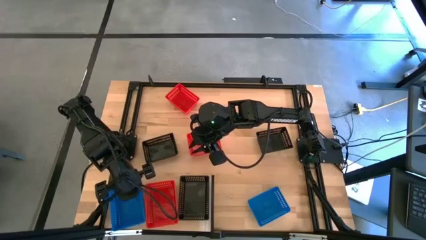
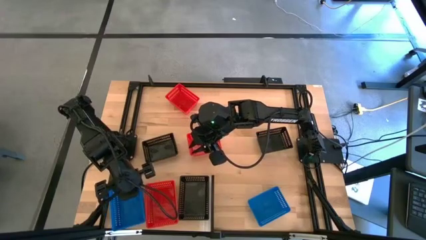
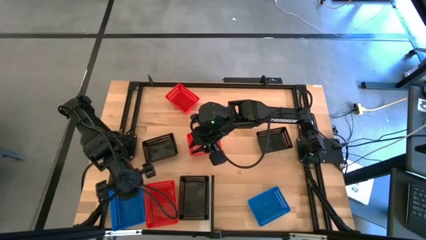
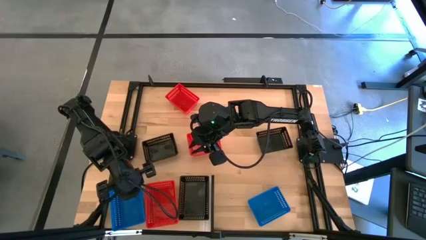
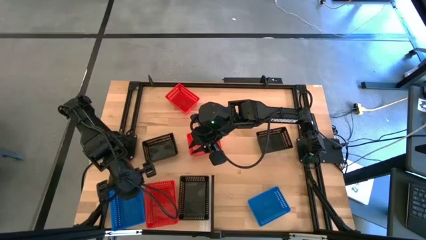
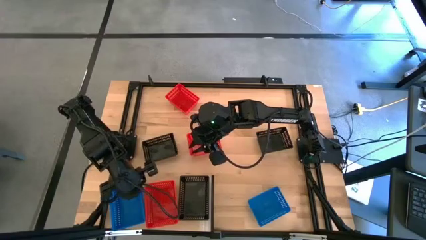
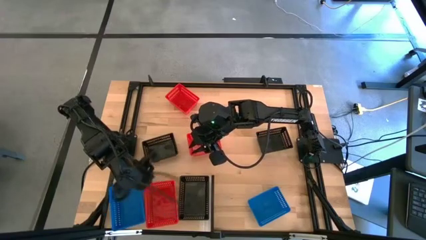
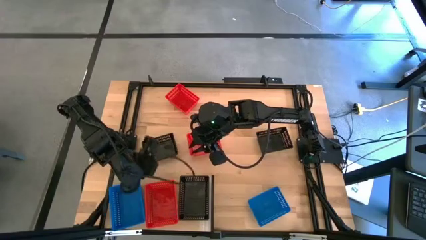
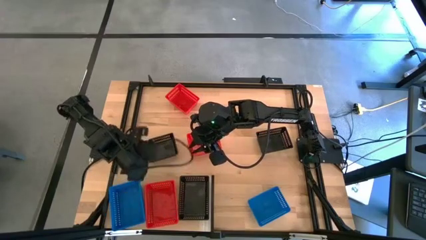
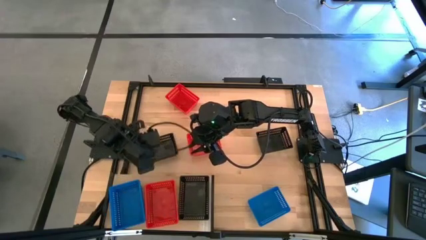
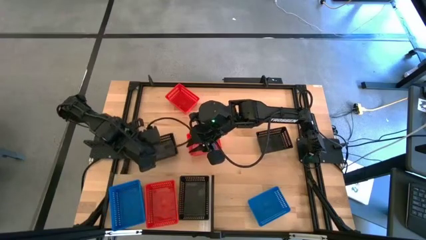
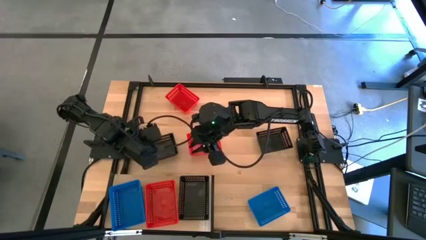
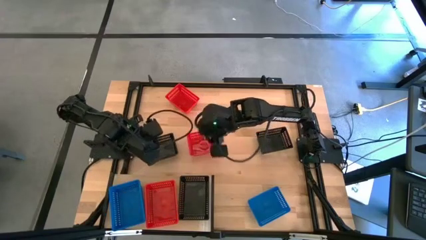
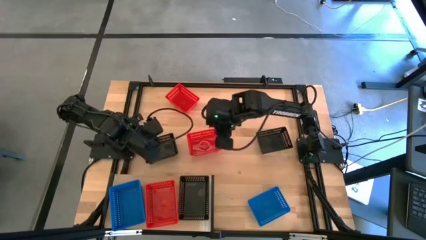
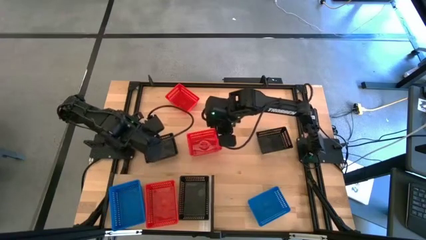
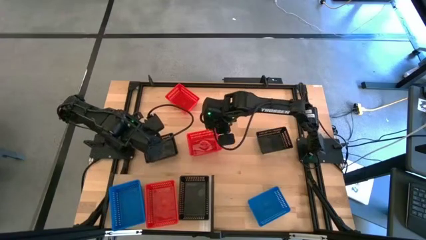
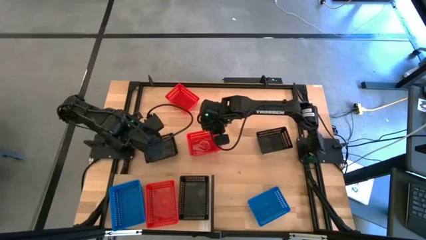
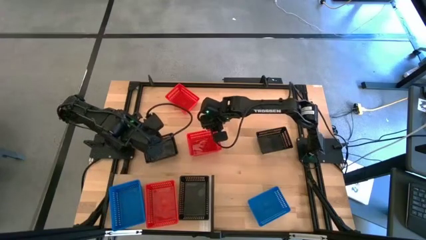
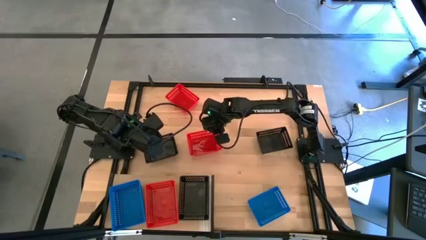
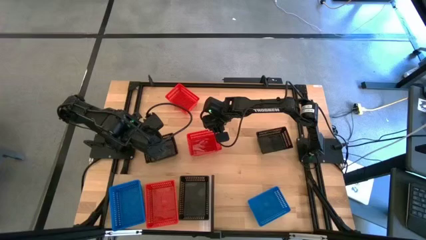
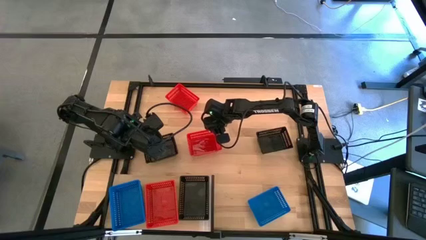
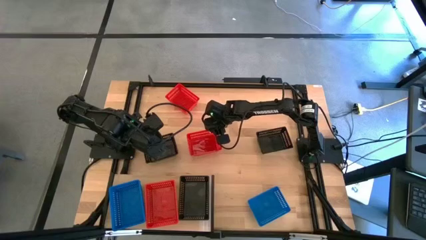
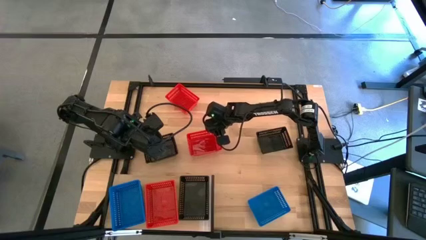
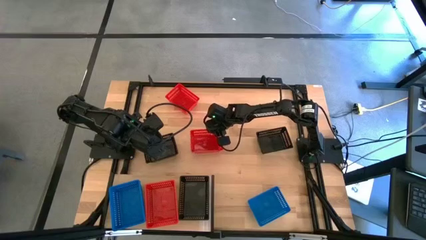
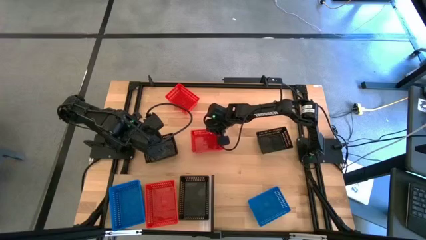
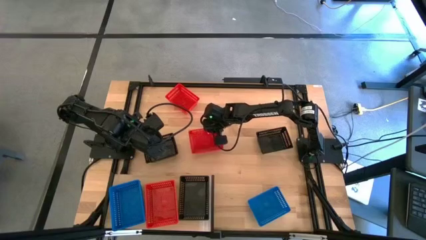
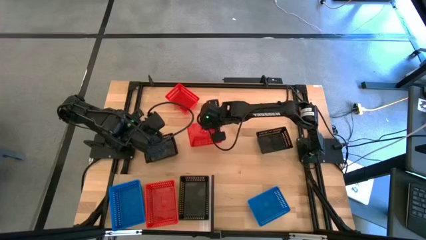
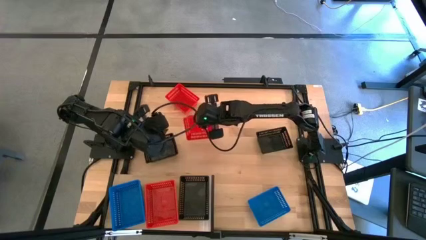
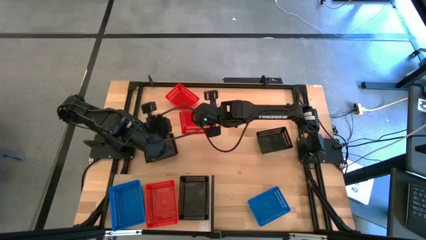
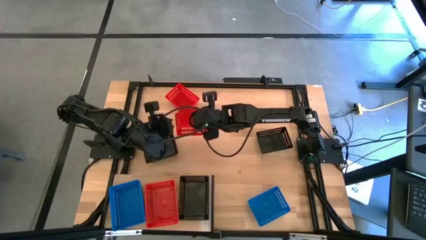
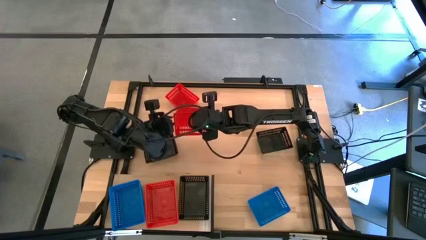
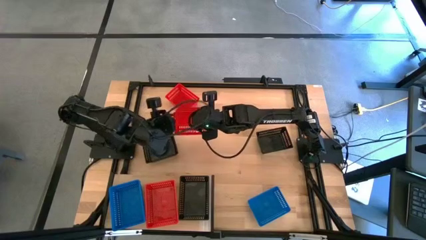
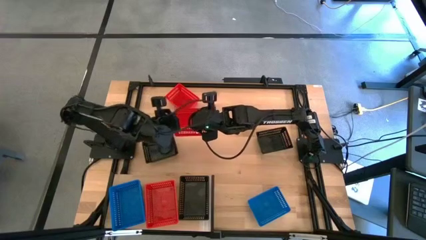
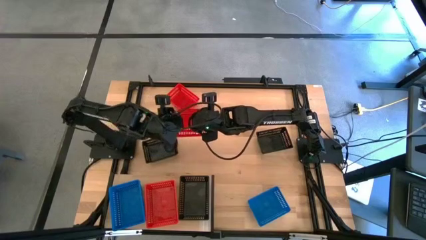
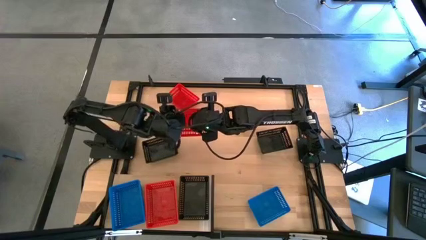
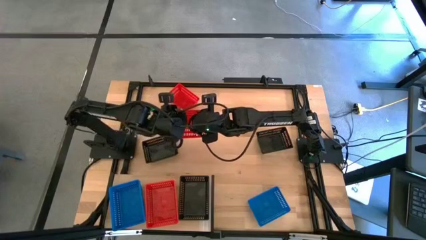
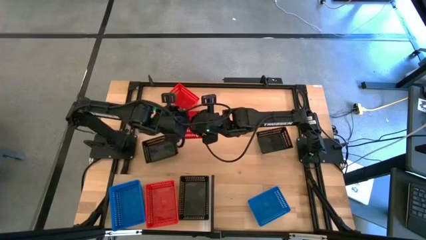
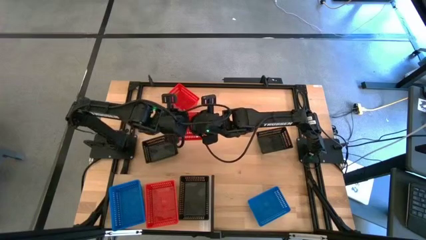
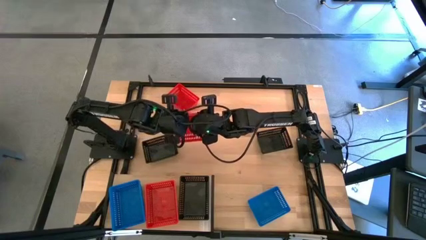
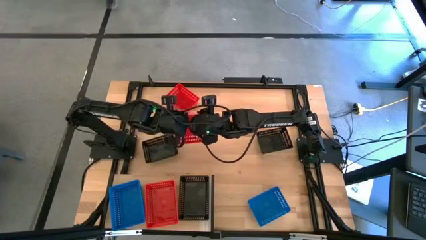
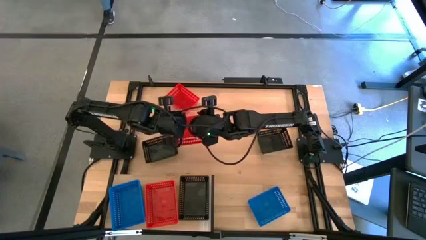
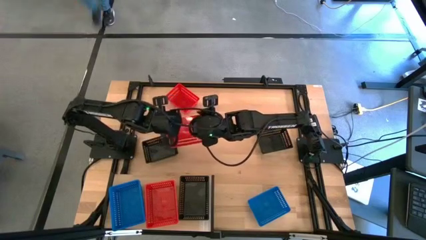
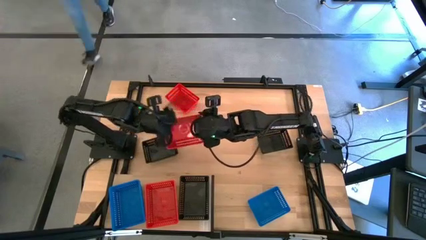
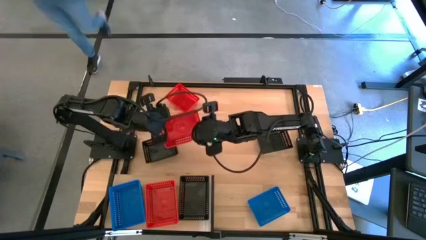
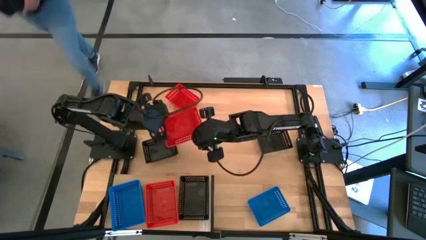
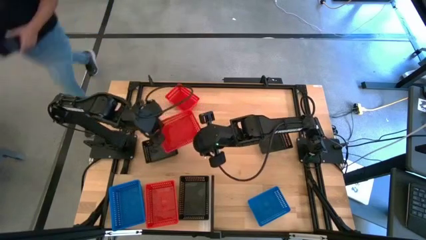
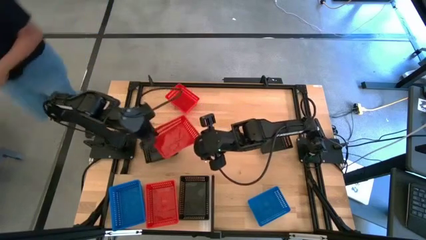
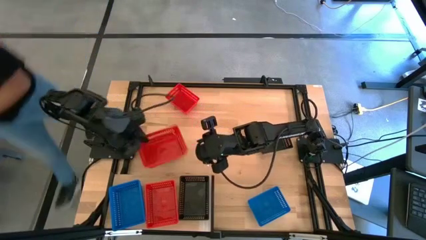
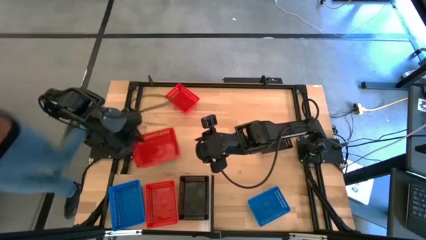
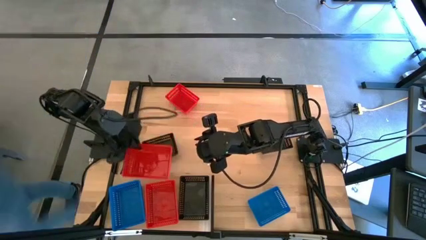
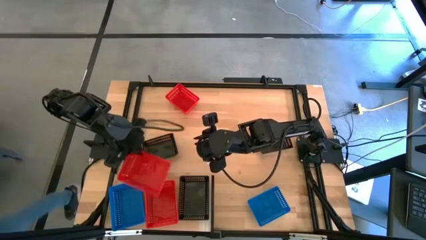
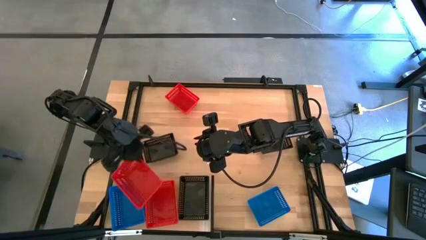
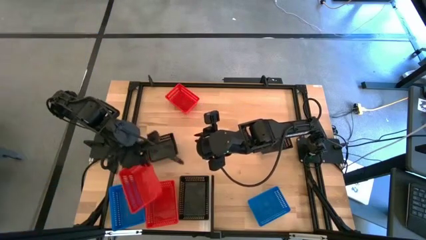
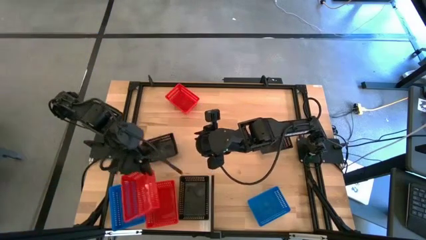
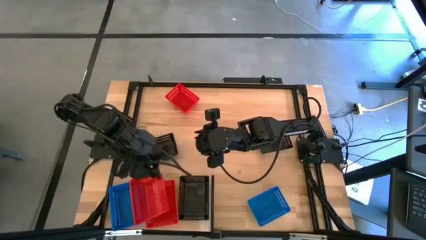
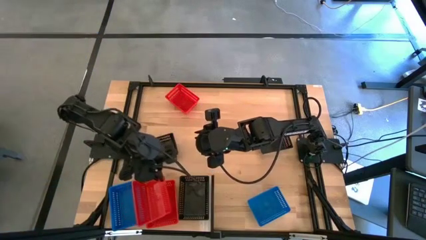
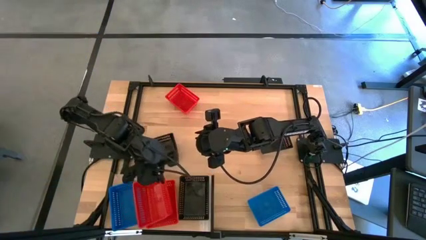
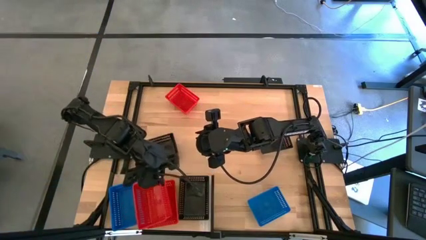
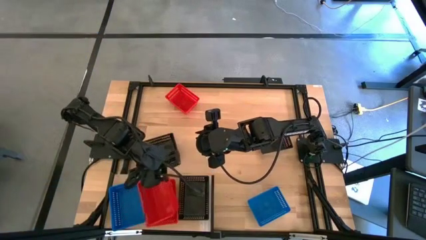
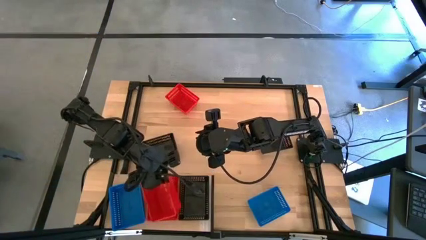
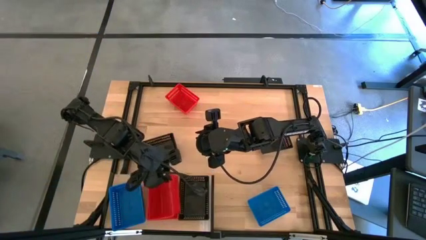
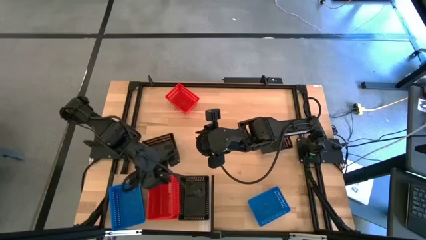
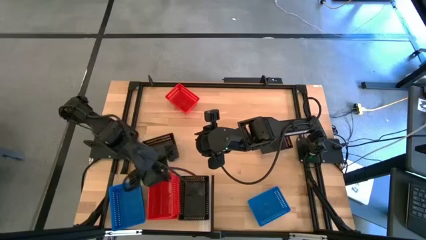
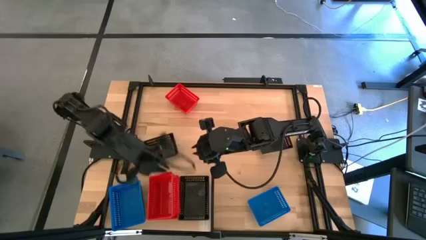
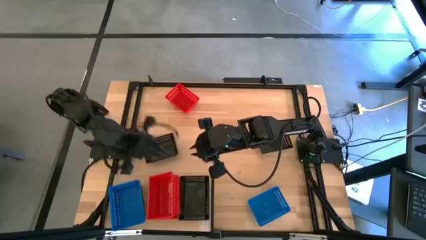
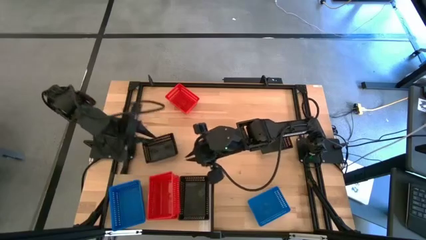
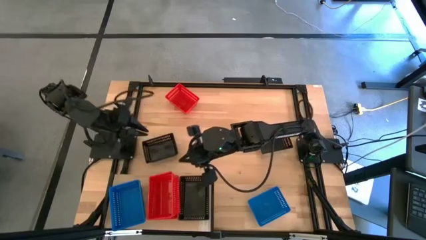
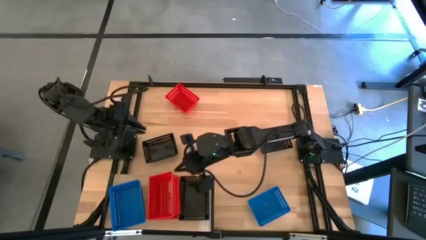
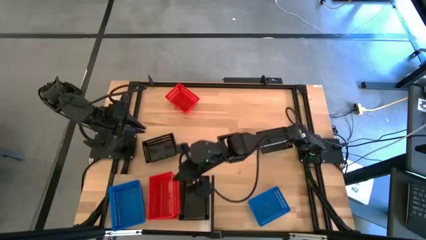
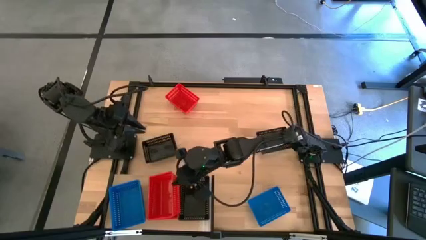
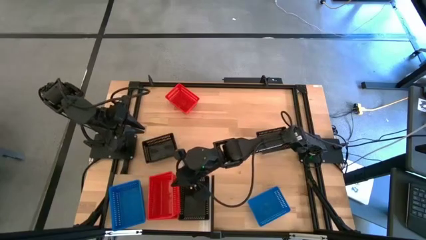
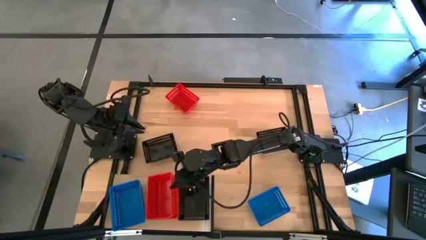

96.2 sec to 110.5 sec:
Task: Stack baskets on shelf by color
Stack the bottom red bin on top of the other red bin on the shelf

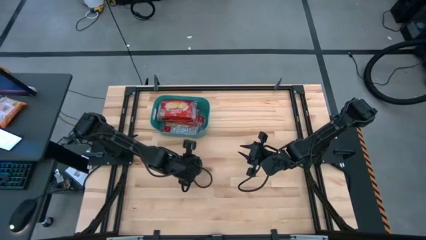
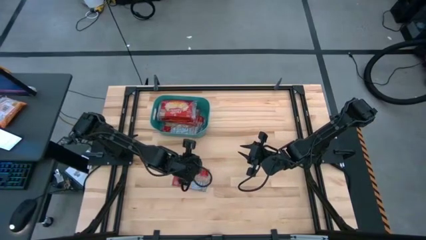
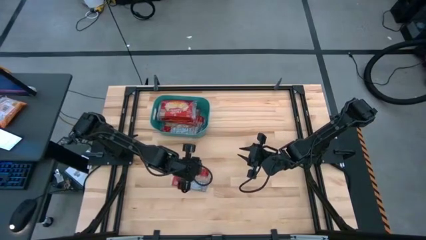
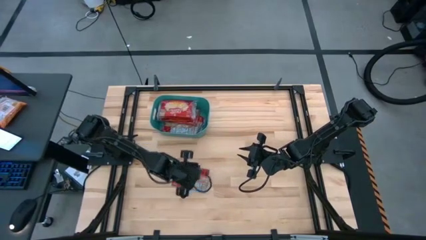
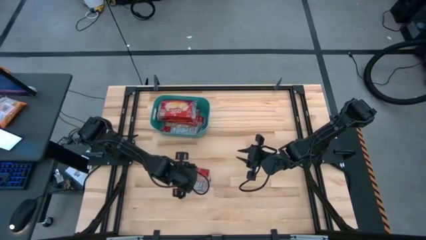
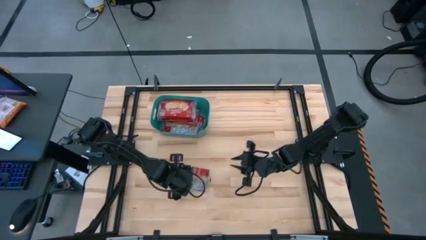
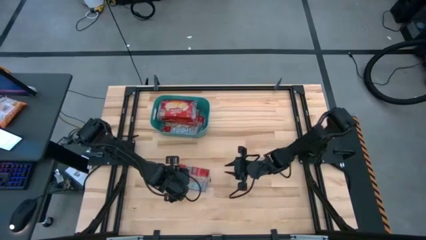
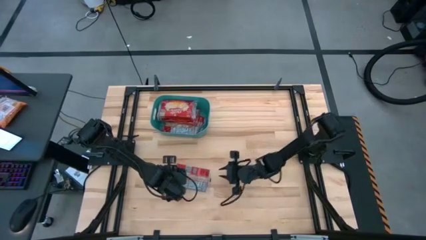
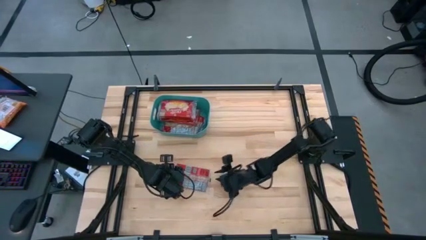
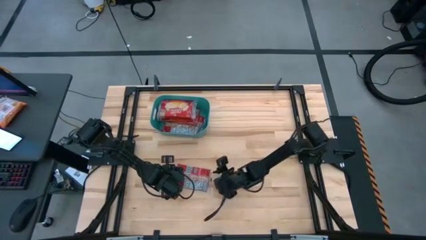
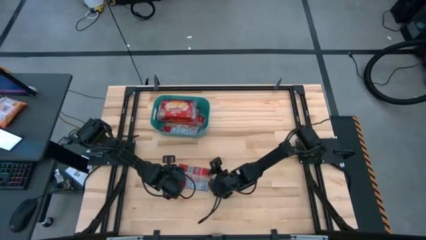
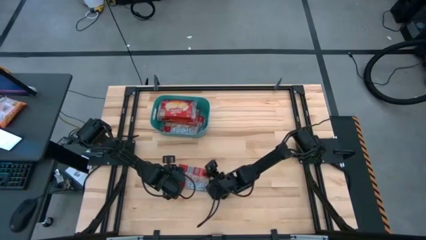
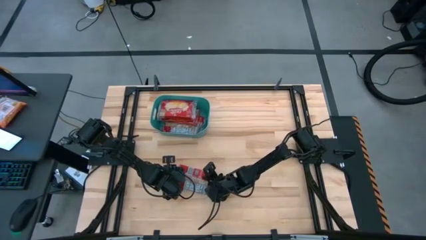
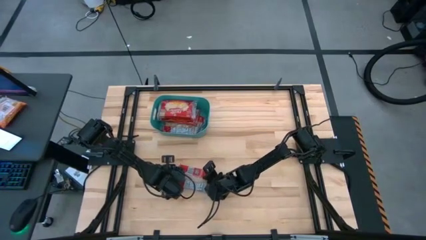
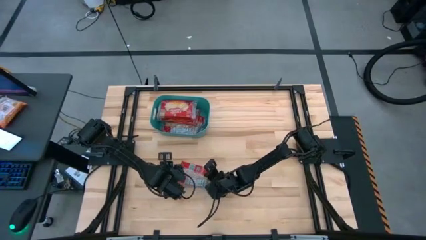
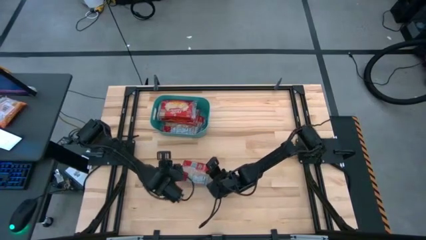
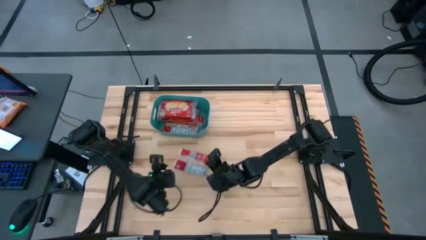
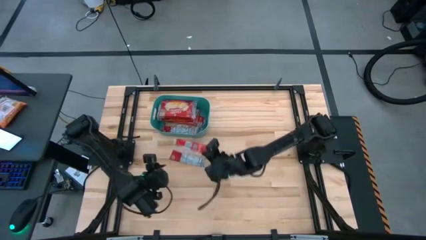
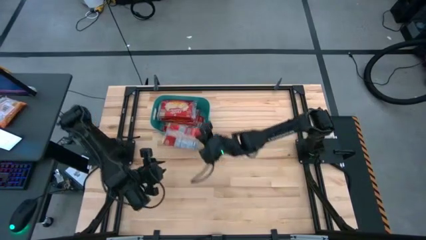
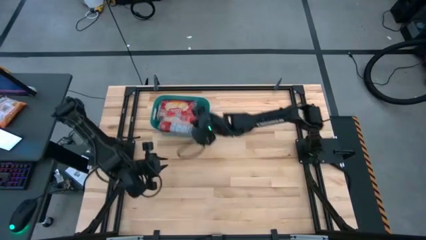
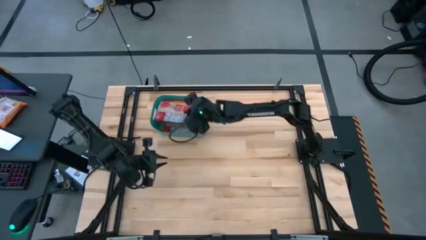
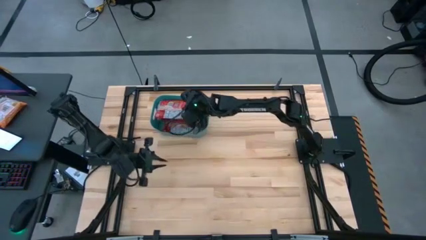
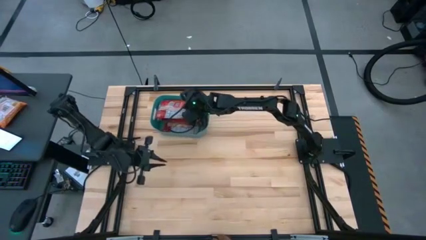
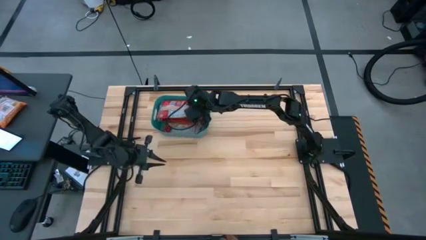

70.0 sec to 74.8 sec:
Task: Sort popcorn bags into baskets
Put the red popcorn pack into the green bin
